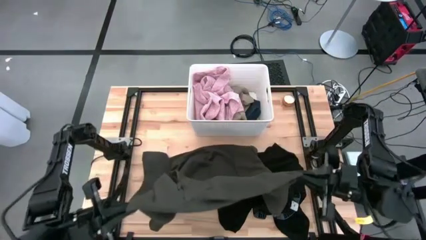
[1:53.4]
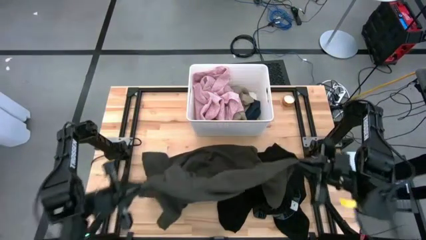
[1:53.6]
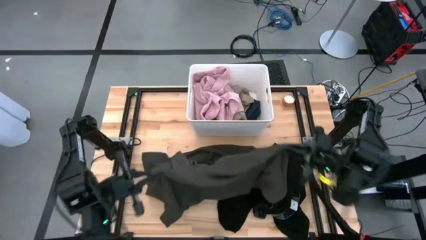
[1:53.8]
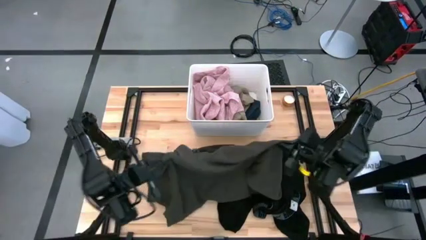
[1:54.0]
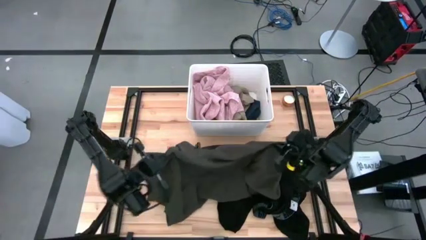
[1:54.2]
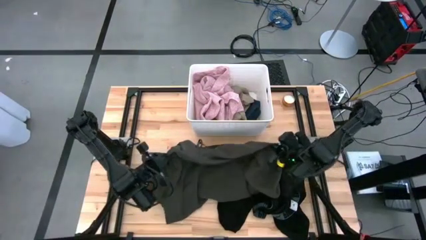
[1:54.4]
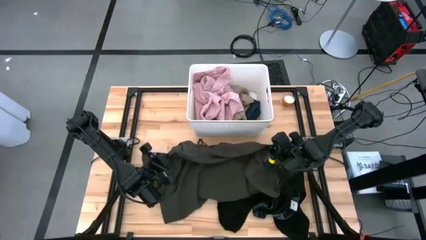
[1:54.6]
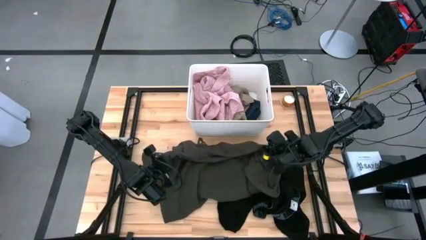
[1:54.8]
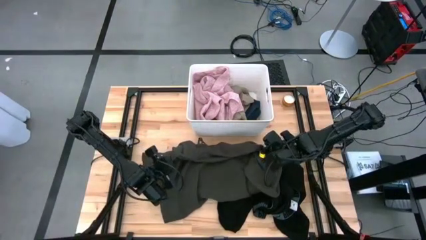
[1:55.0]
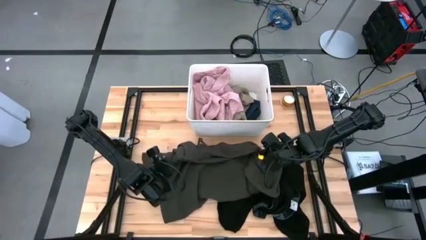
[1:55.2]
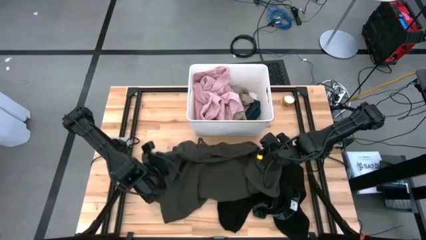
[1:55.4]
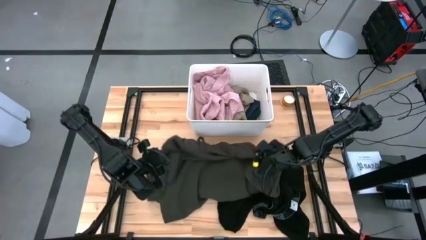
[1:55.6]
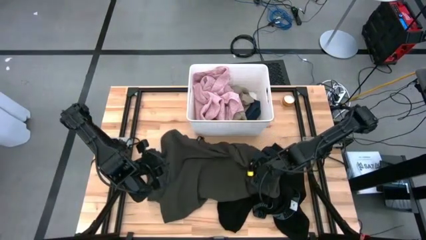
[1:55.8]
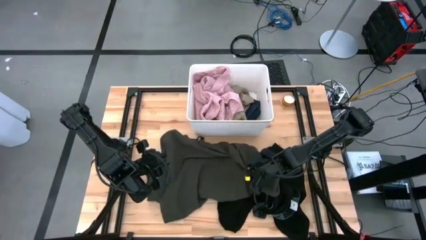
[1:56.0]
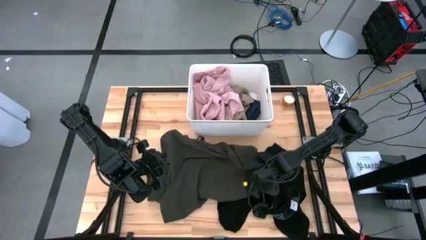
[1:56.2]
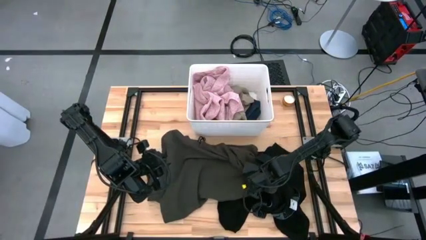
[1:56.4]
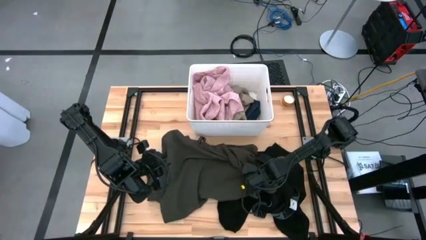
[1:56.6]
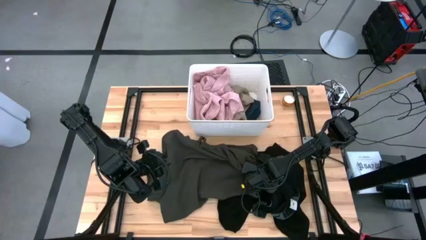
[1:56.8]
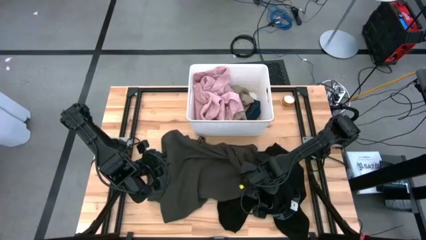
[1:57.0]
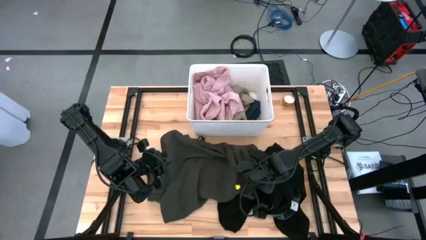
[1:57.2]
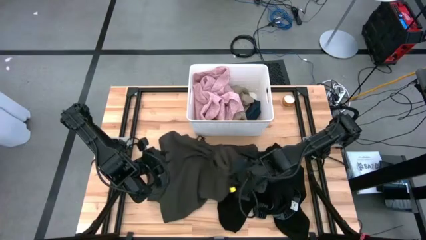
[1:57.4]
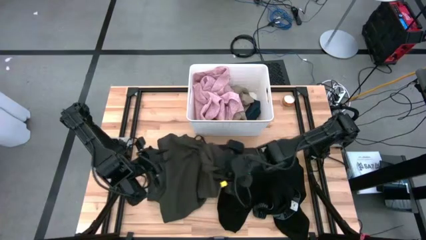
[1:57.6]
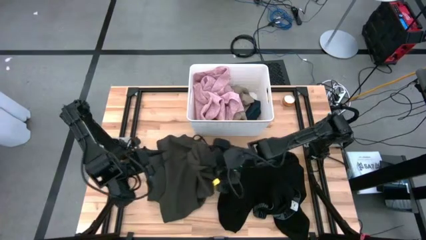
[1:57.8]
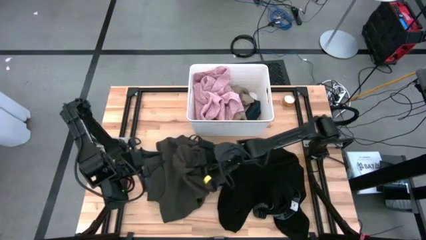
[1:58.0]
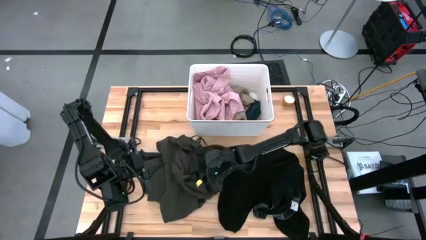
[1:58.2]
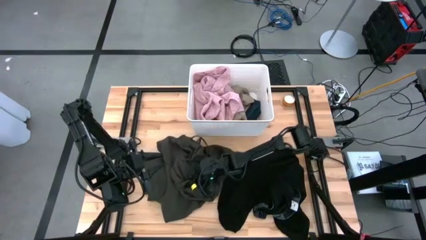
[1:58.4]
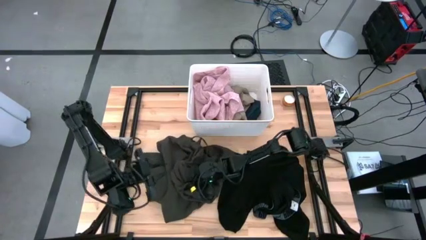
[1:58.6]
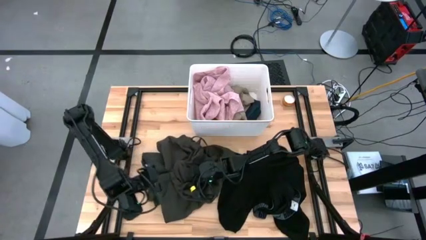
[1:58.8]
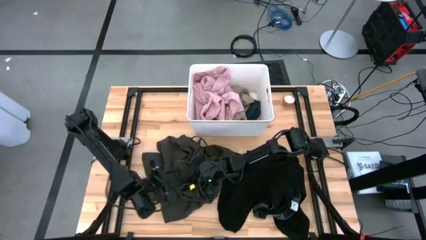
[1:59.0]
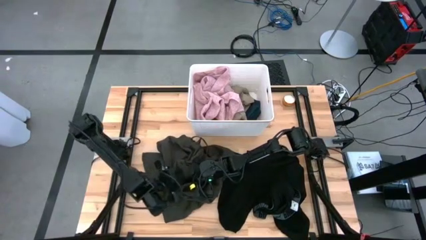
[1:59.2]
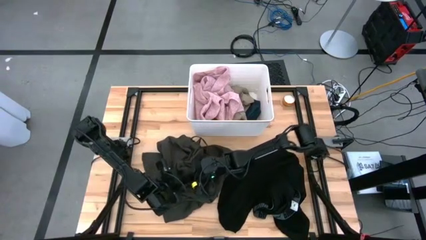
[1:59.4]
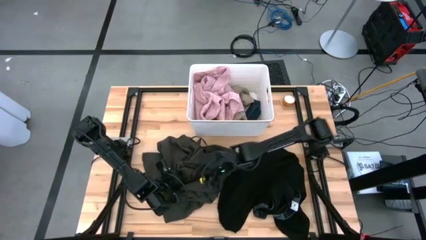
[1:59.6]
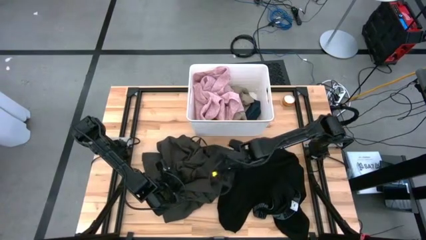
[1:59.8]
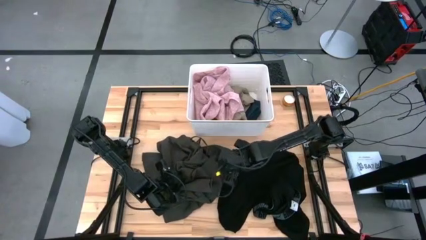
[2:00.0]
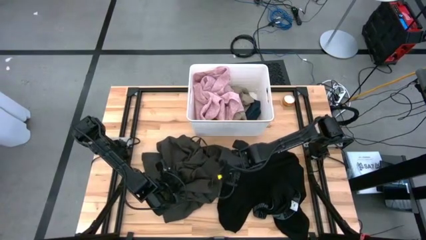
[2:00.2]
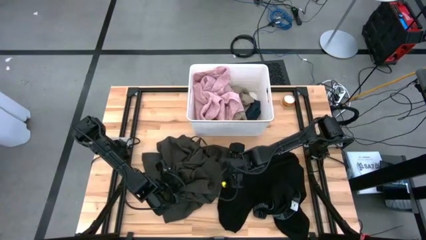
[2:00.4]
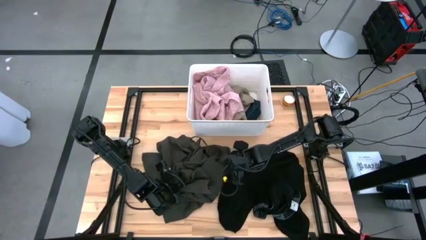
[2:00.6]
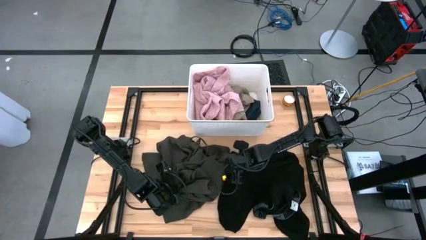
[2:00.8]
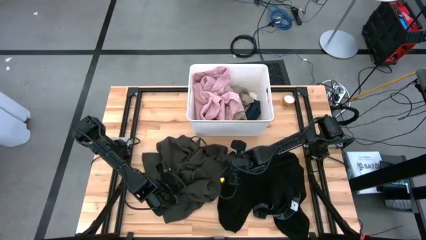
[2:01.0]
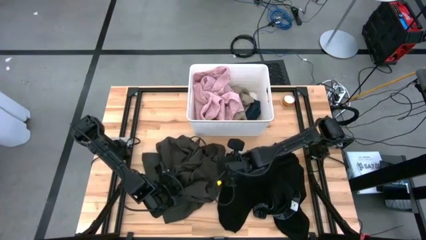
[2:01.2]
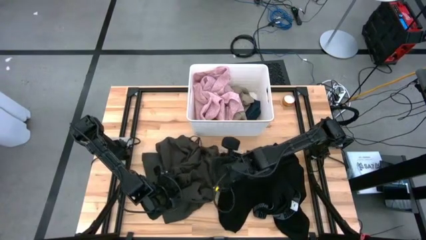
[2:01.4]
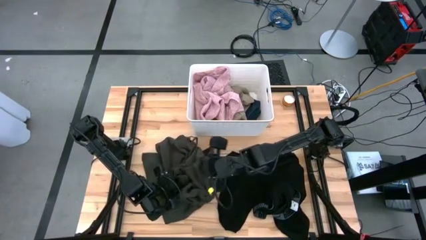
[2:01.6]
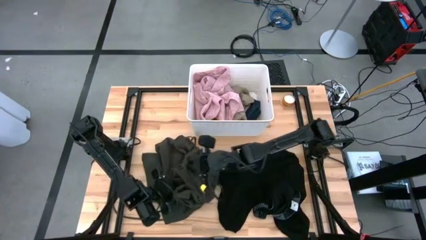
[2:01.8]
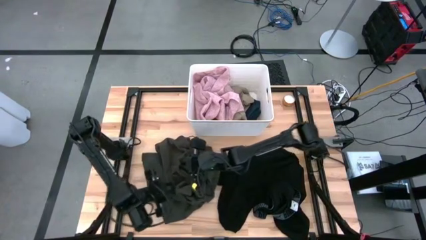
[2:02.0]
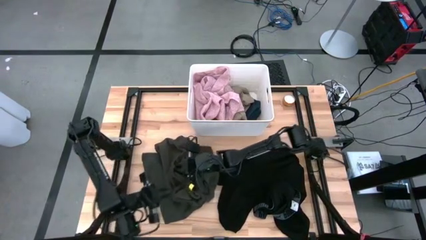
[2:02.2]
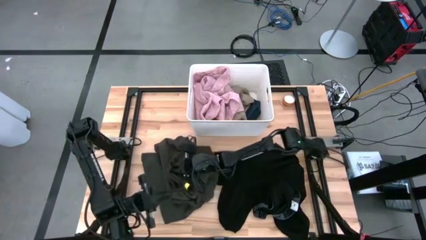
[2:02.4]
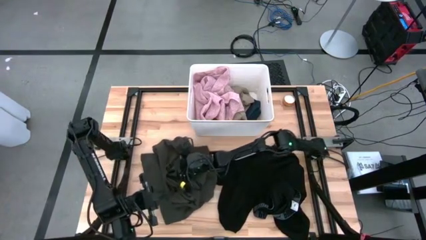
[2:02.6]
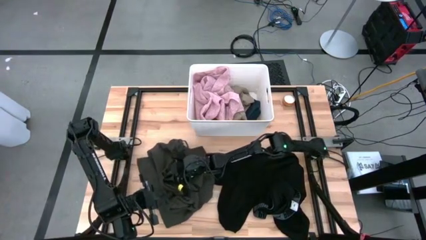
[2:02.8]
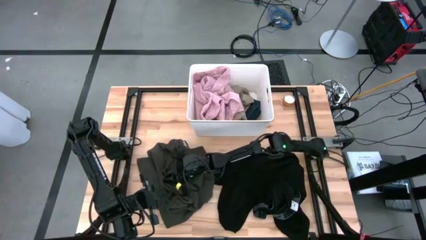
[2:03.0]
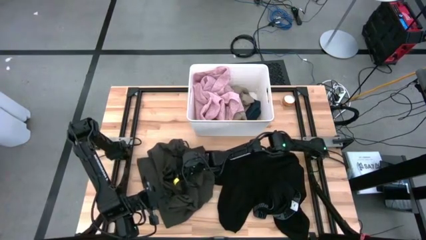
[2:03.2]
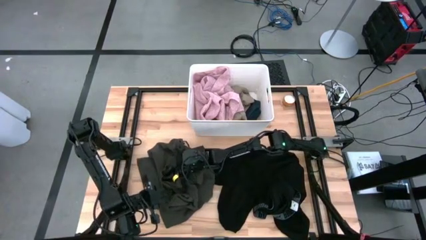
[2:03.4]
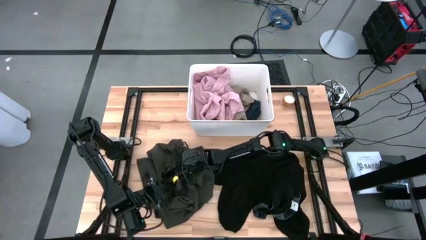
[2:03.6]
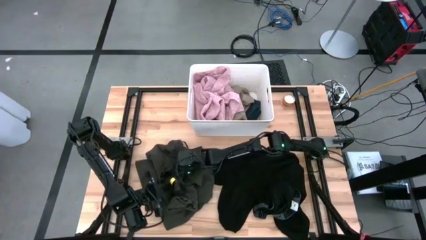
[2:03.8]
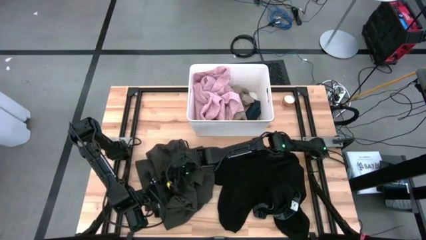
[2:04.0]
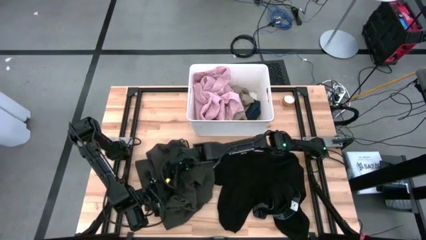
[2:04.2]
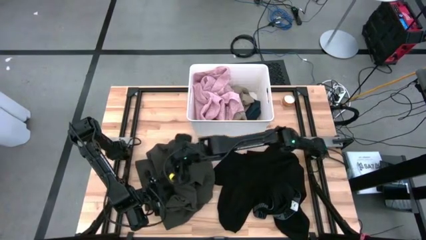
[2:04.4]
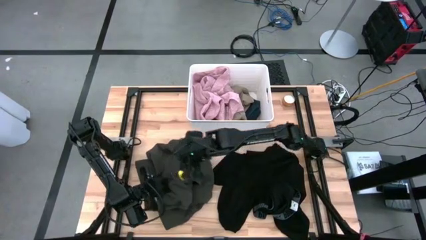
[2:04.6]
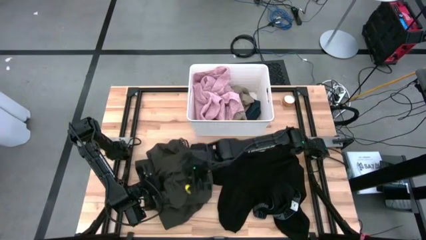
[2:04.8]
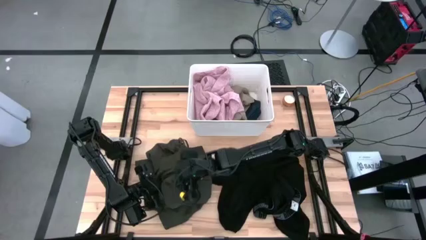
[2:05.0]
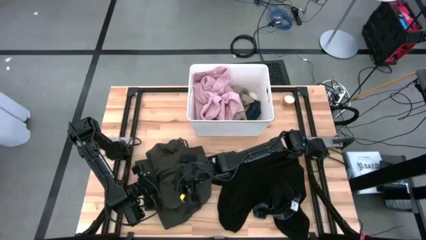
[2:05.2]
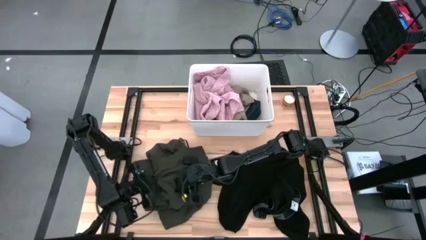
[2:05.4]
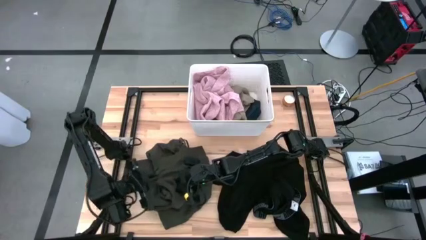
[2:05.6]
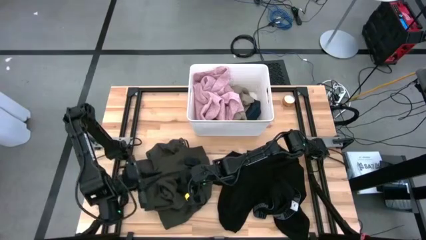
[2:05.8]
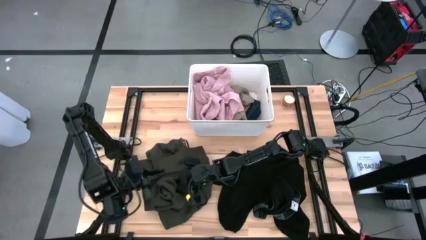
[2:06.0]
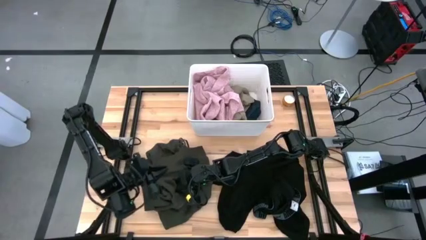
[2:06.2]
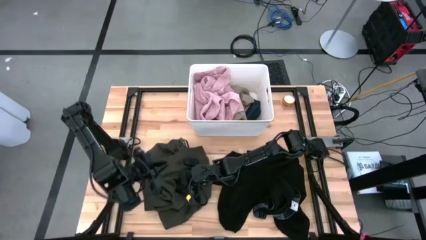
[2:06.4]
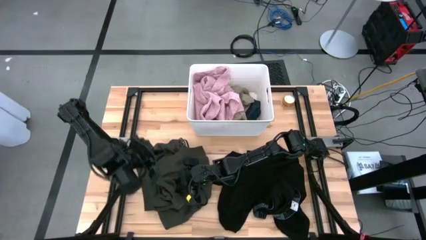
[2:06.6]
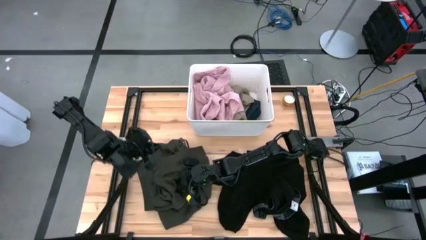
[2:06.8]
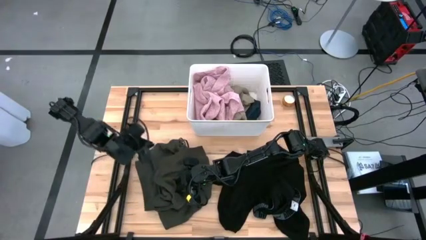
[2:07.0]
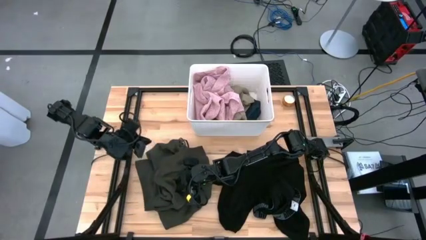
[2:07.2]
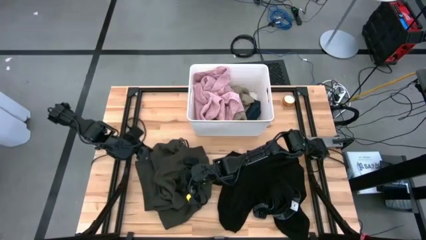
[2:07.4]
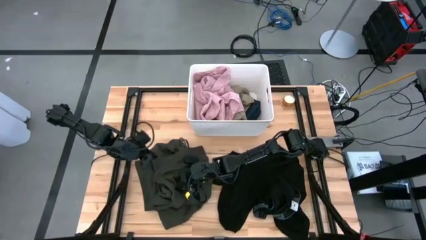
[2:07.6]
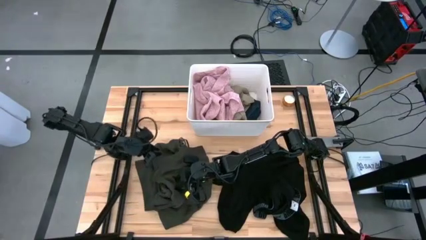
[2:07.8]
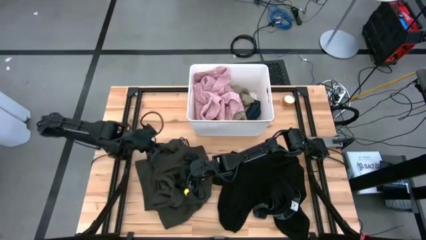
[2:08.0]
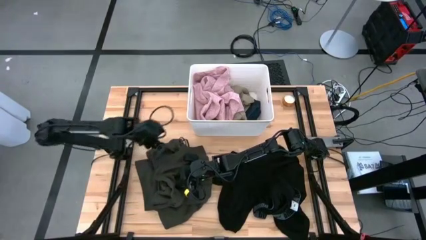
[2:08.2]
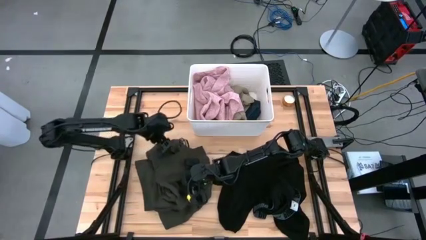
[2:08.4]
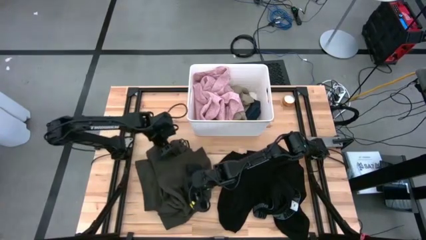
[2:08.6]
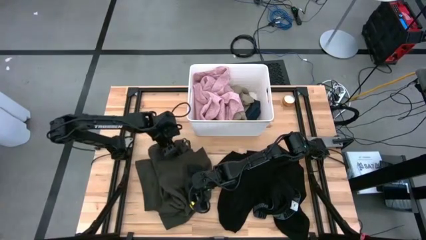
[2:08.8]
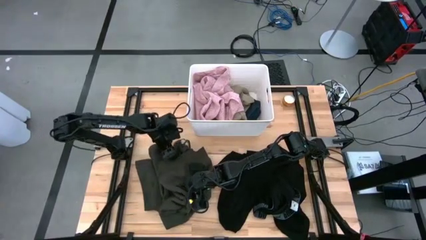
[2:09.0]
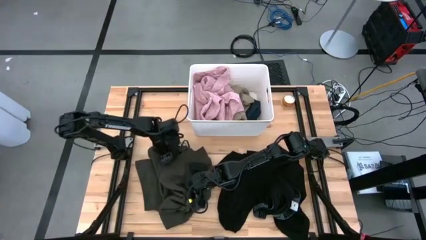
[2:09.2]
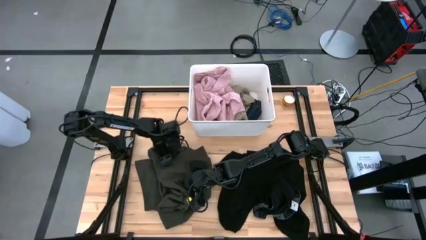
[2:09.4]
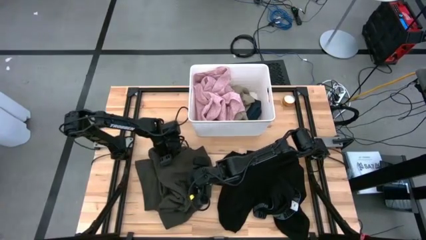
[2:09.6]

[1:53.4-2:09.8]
Task: Sort clothes
Fold the gray jacket
